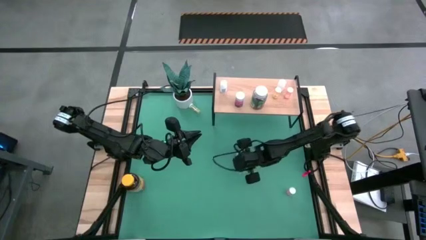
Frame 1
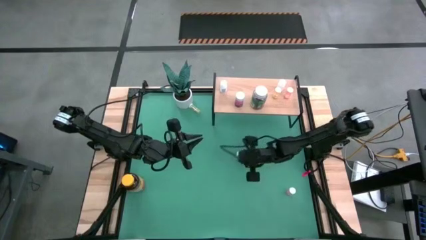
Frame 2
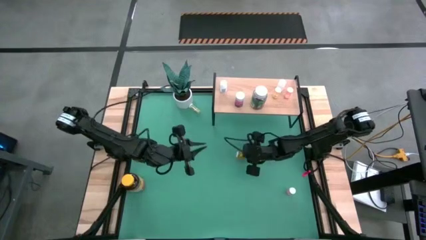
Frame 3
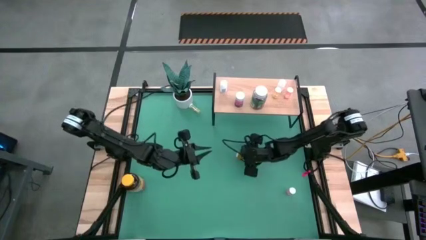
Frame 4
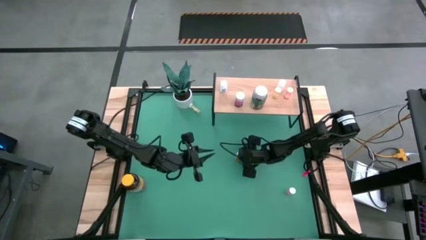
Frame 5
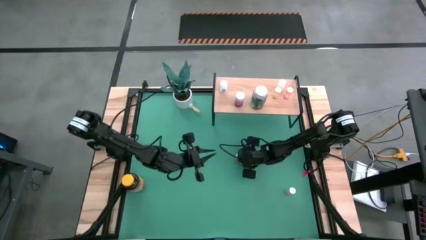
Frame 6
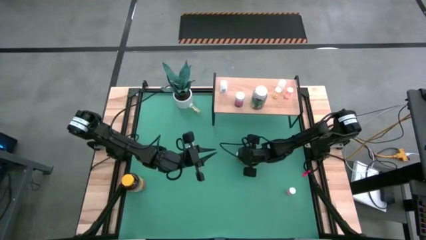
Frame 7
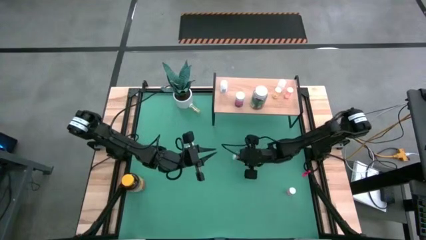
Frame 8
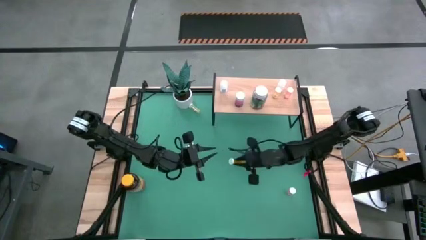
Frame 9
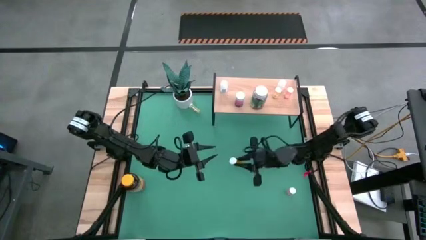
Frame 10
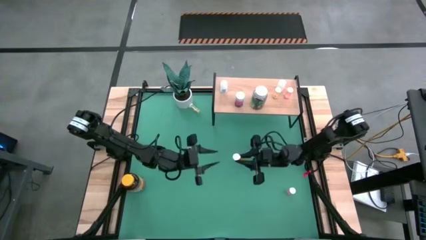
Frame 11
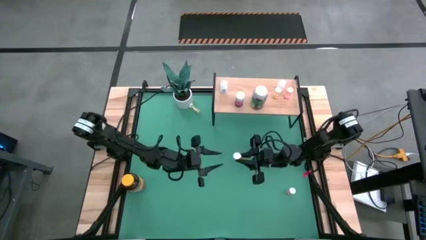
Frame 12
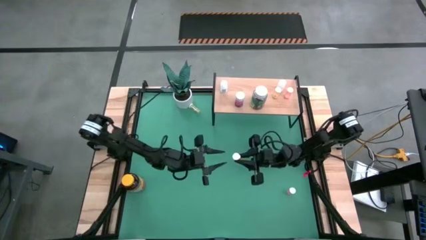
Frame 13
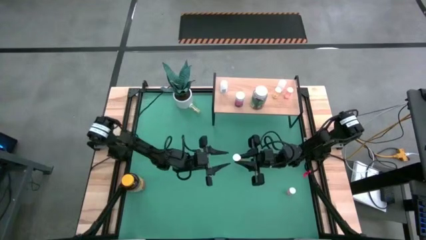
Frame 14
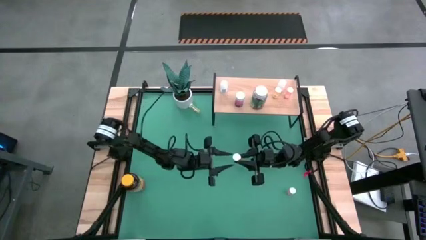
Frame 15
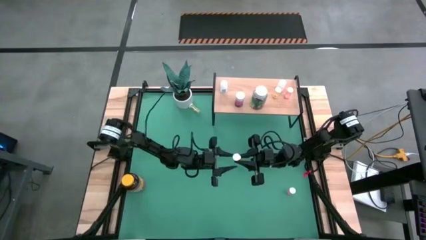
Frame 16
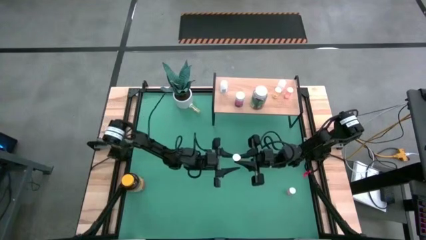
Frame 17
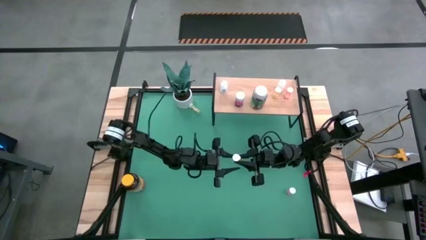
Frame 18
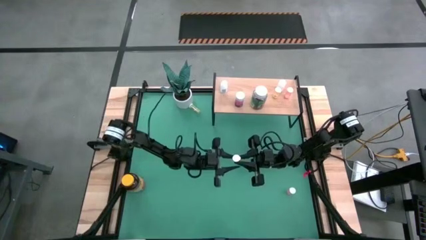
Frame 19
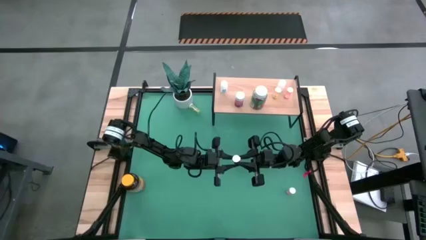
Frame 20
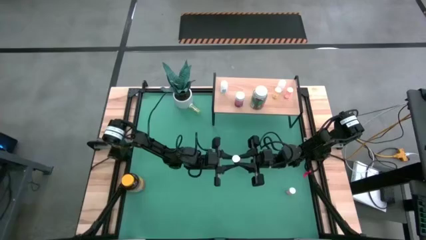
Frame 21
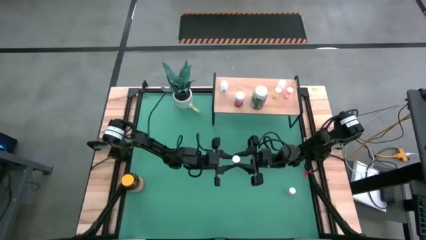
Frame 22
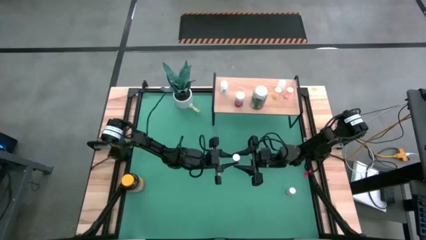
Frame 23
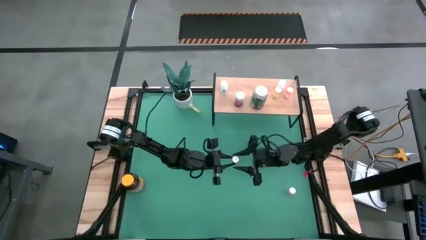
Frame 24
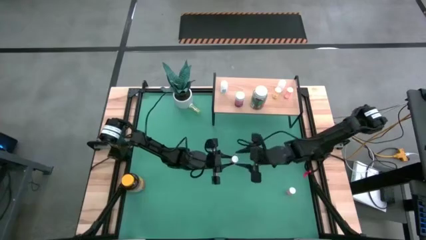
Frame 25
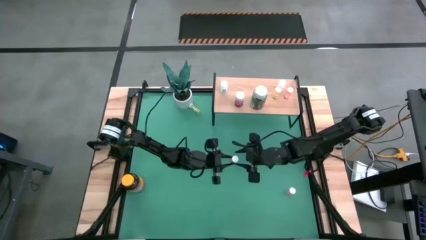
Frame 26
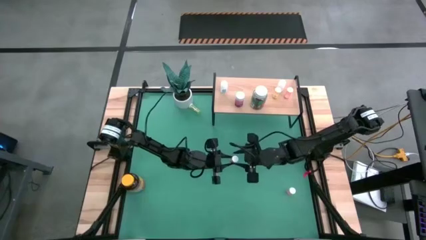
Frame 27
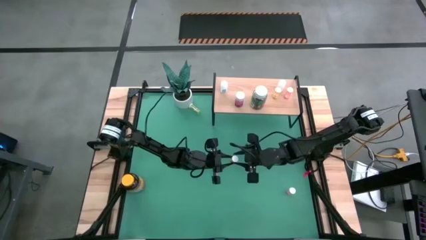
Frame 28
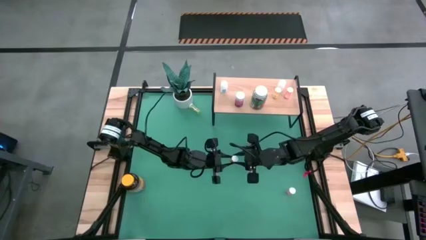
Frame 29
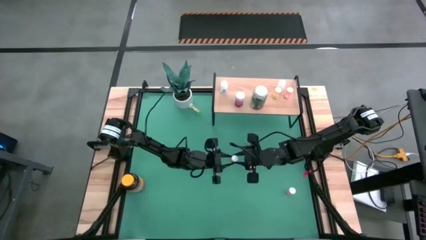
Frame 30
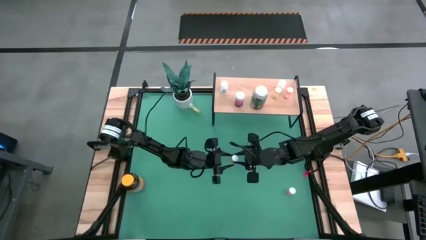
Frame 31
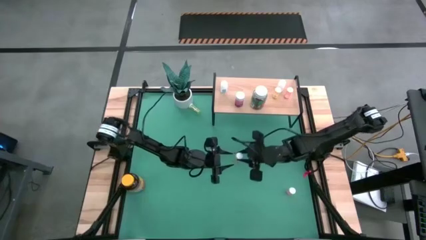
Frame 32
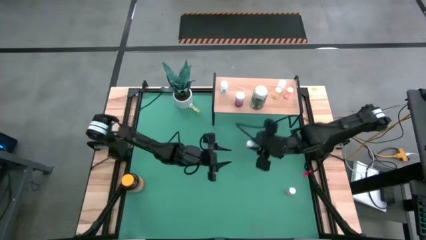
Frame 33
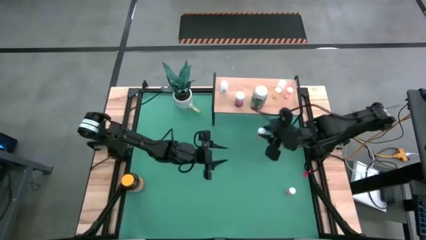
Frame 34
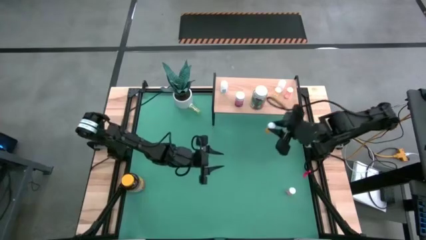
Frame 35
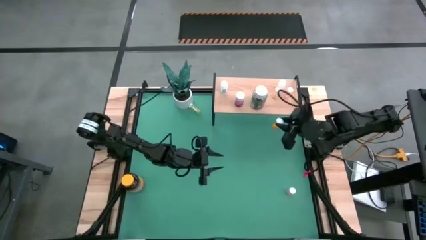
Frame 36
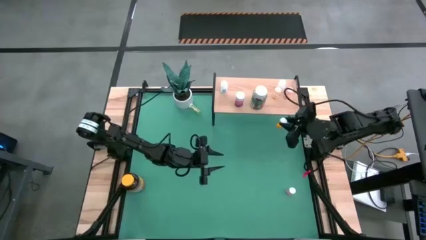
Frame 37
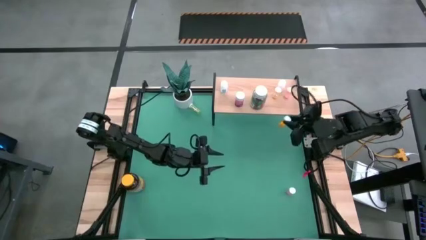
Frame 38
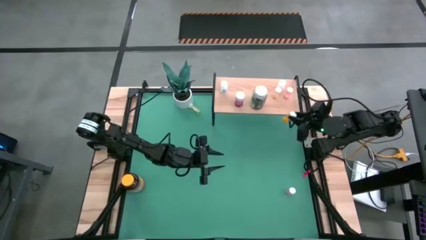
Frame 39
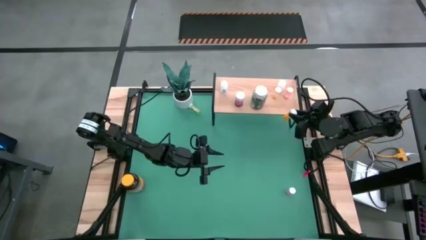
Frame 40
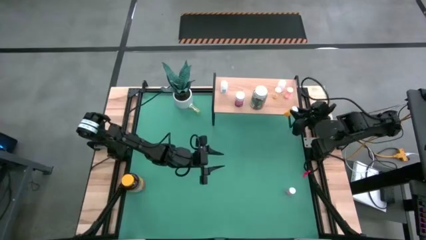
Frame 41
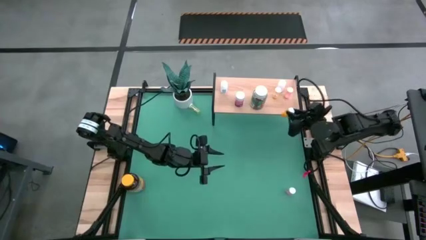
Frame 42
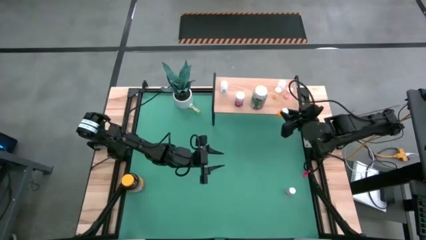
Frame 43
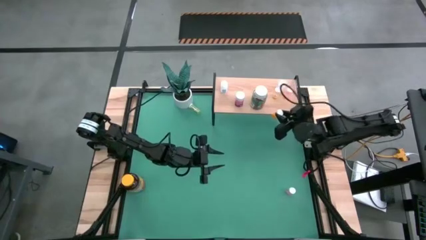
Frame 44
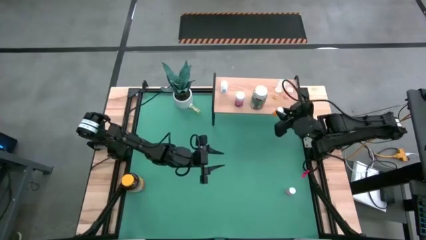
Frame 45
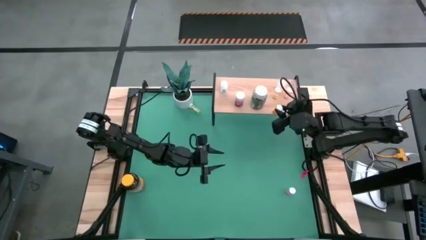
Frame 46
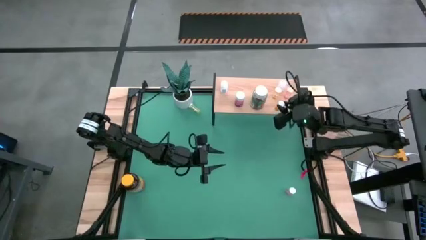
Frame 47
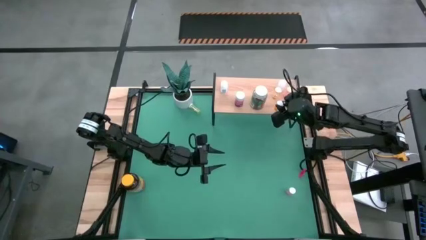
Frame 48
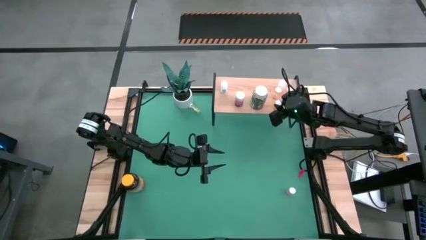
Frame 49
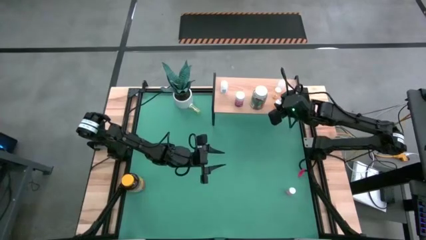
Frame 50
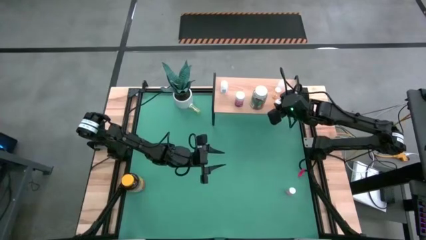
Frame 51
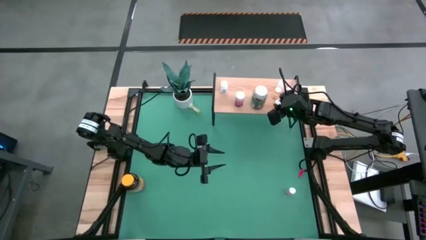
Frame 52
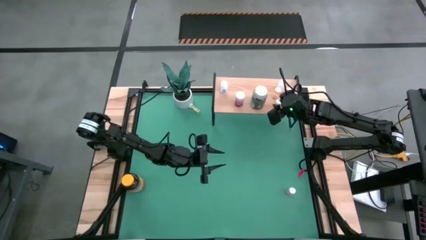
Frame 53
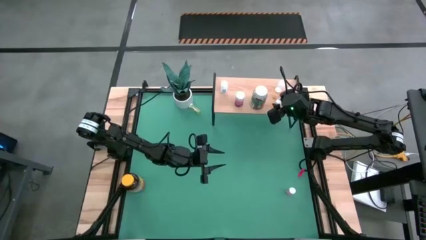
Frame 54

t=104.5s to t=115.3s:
Task: Pick and place medicine bottles onto shelf by color
Put the orange pill bottle on the shelf

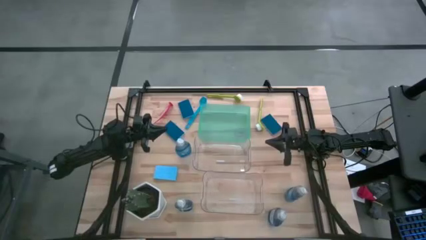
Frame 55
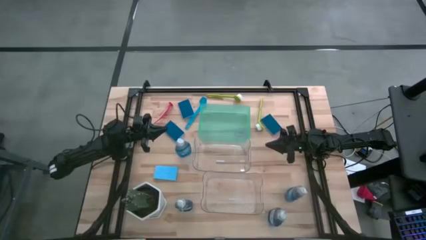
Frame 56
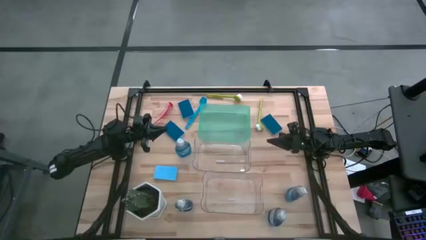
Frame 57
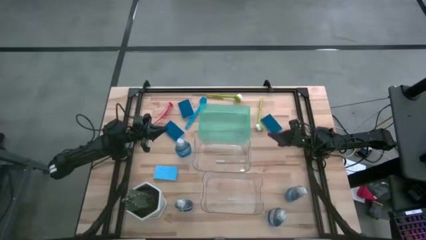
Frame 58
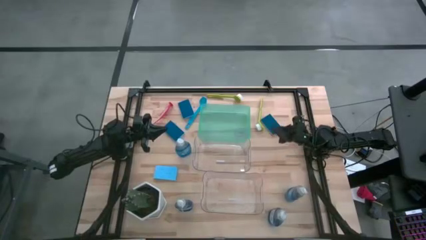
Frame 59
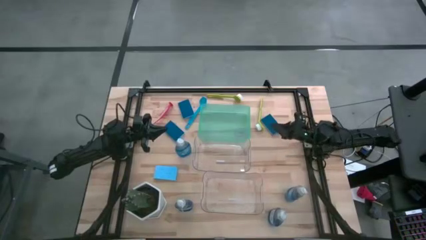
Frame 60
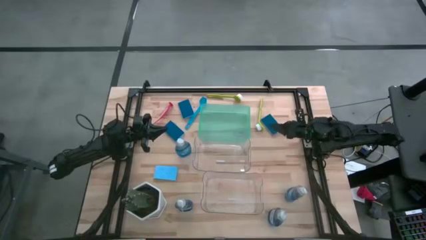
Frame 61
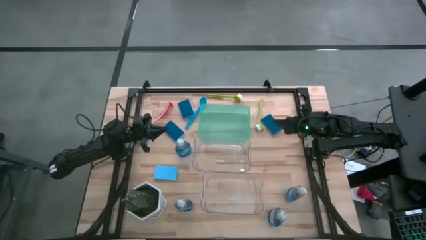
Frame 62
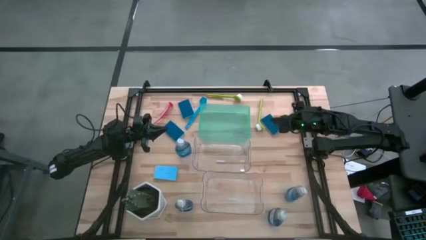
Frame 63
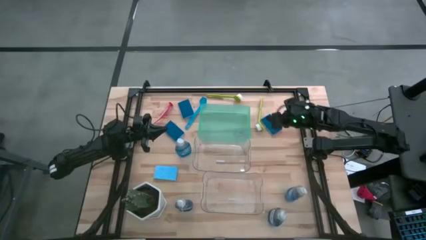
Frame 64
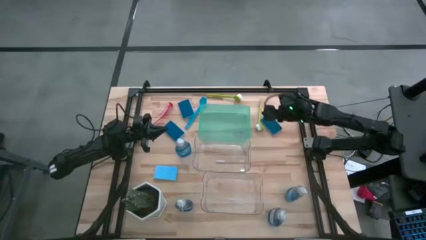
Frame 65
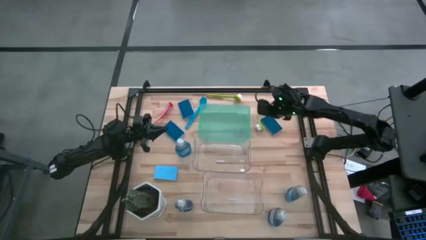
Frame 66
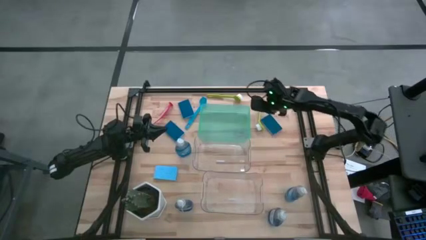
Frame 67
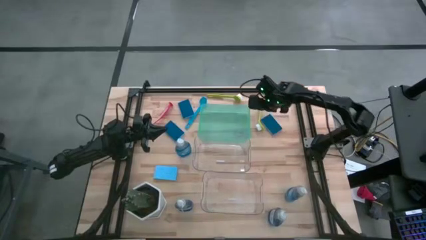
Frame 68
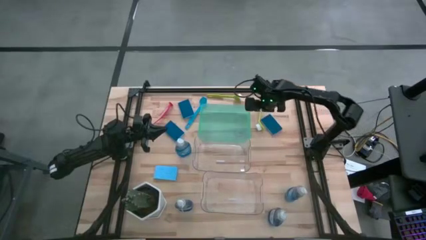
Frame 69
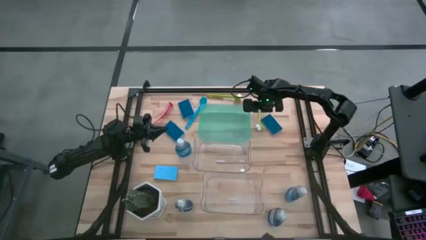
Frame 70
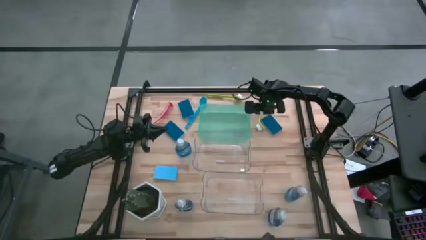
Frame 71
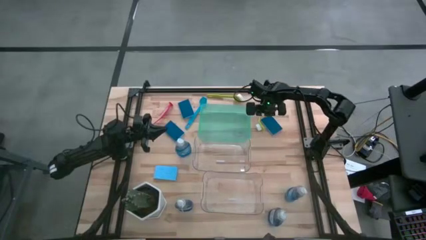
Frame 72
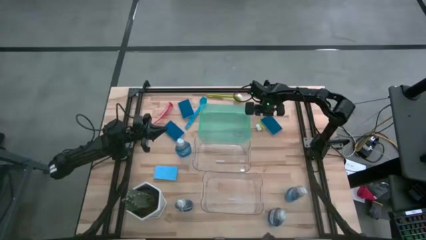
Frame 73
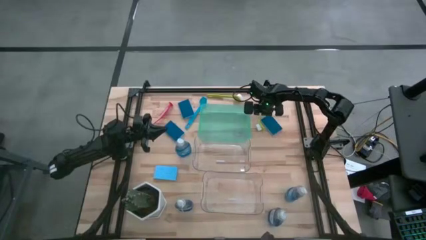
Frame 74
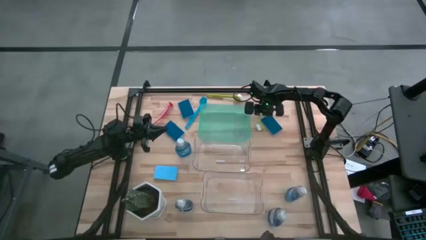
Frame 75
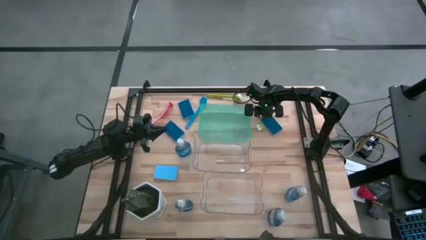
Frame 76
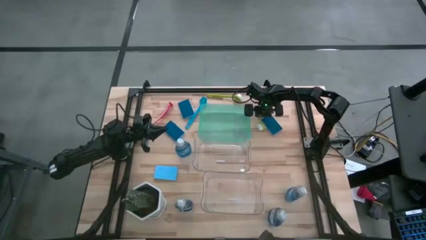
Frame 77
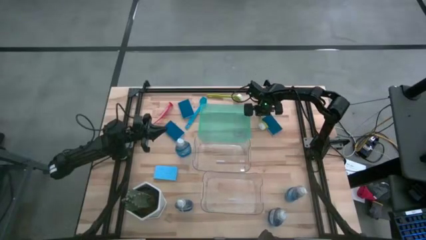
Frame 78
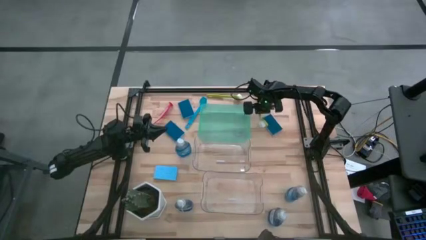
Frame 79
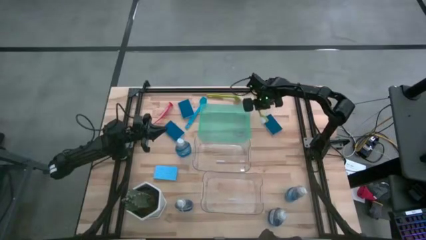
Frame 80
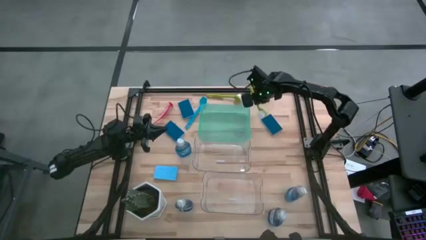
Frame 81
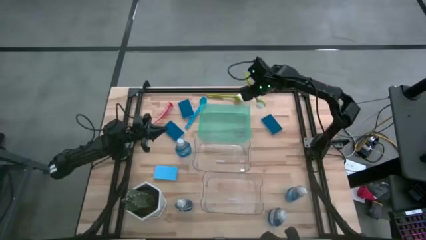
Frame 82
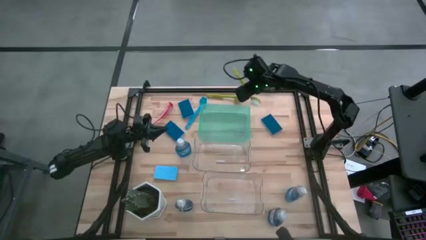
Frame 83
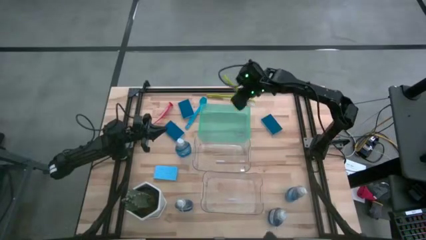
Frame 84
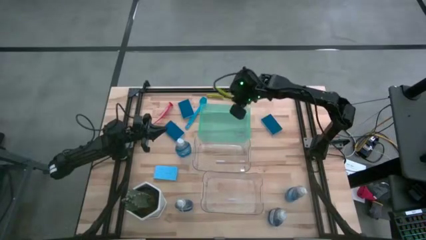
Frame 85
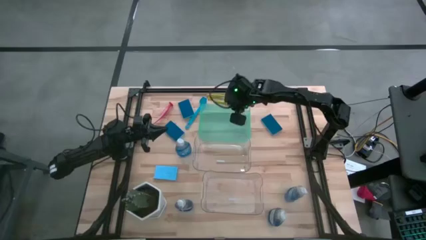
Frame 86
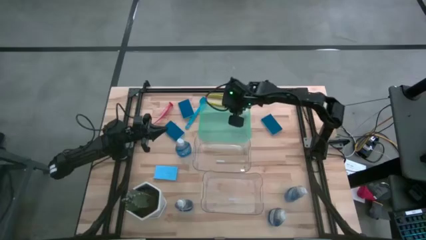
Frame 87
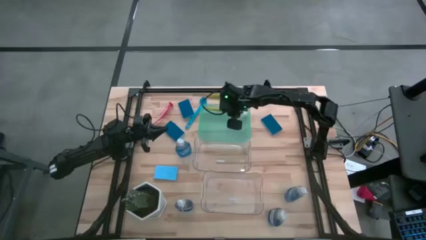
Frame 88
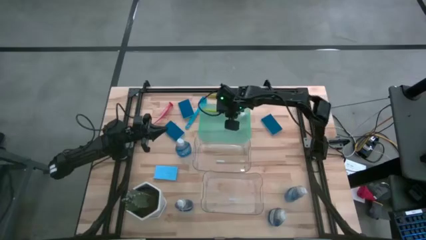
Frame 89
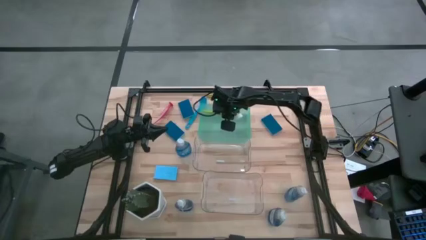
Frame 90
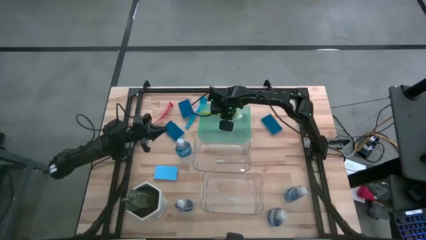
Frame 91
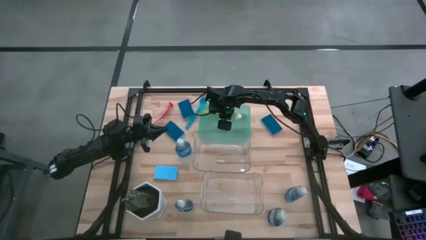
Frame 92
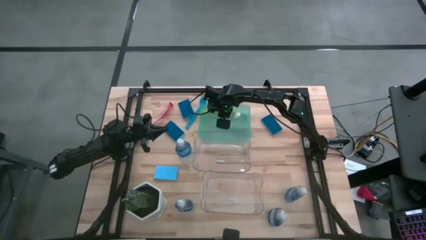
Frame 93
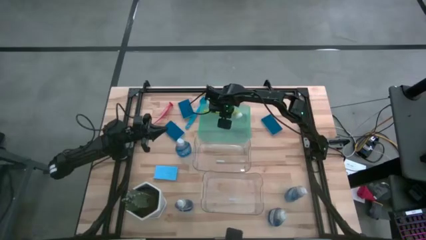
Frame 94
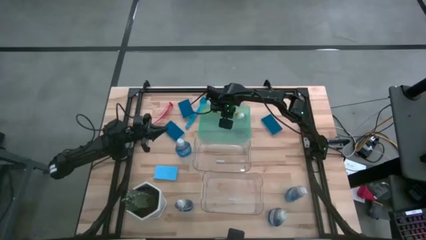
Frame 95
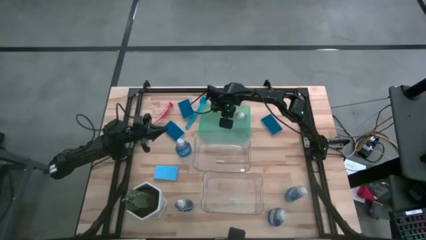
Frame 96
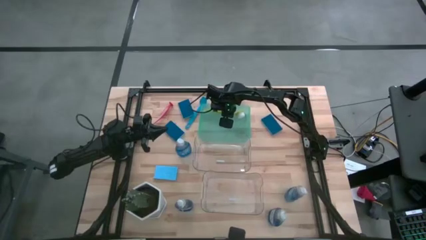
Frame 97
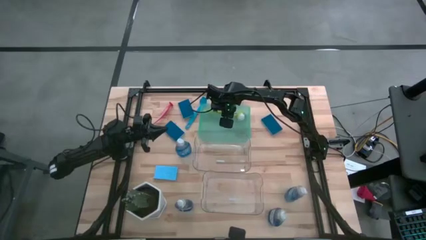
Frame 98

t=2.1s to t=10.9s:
Task: Pick & Place Kitchen Sink Supplies
Put the green dish brush into the green bin
